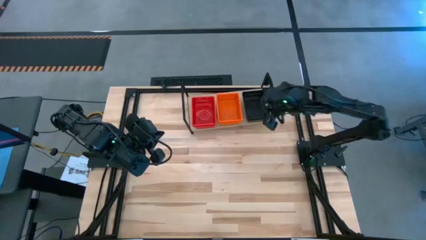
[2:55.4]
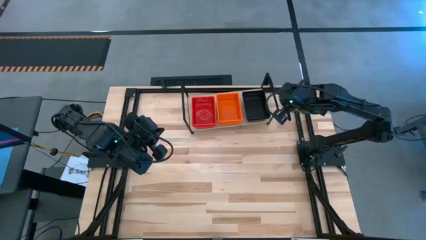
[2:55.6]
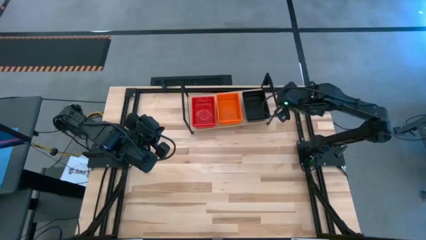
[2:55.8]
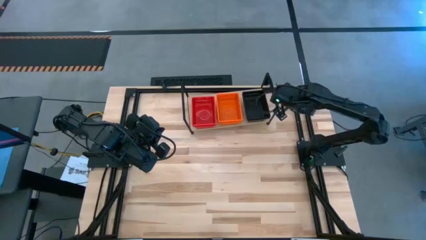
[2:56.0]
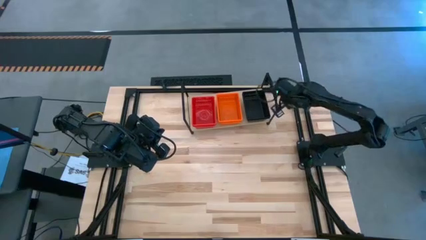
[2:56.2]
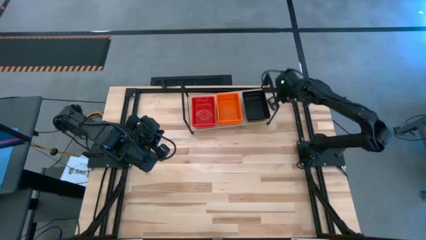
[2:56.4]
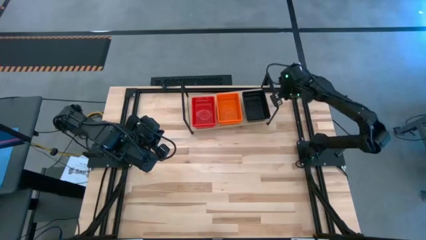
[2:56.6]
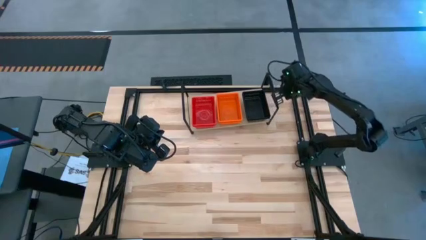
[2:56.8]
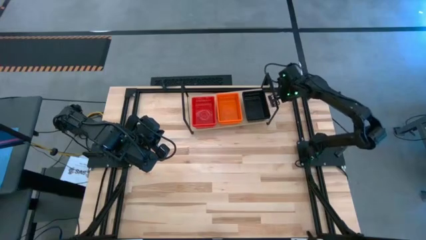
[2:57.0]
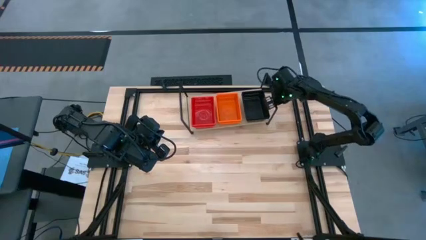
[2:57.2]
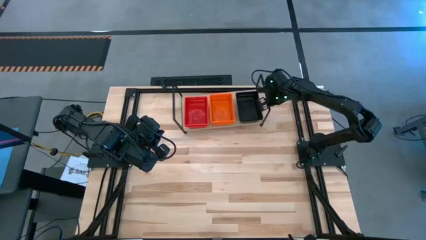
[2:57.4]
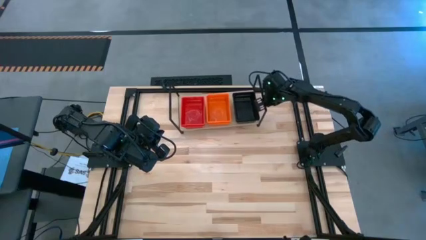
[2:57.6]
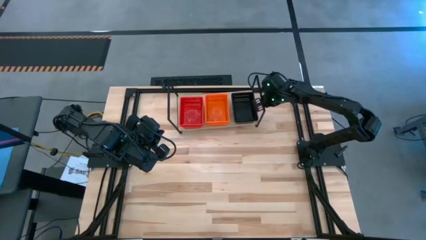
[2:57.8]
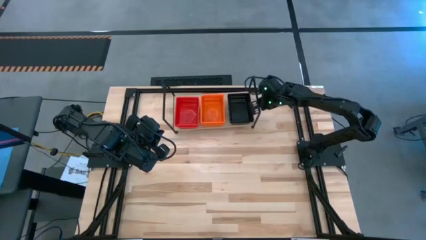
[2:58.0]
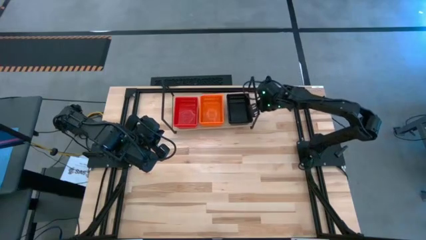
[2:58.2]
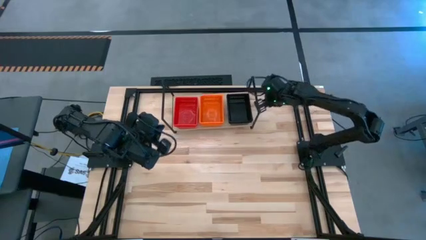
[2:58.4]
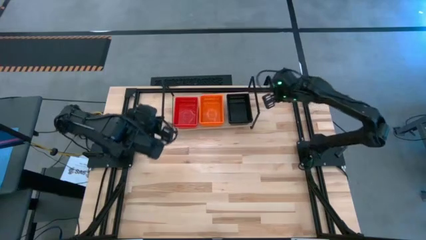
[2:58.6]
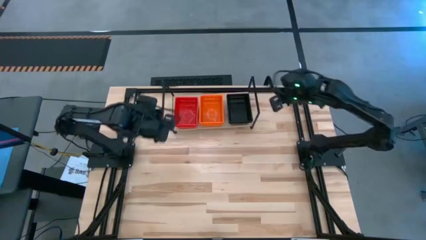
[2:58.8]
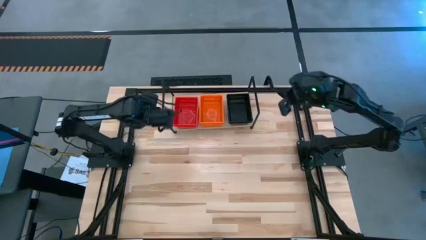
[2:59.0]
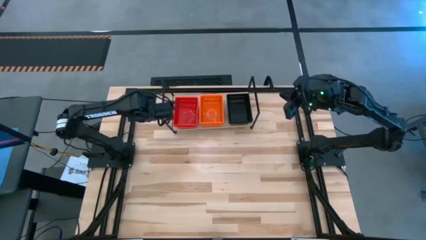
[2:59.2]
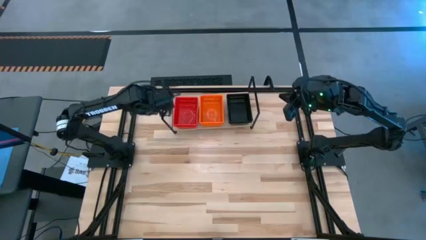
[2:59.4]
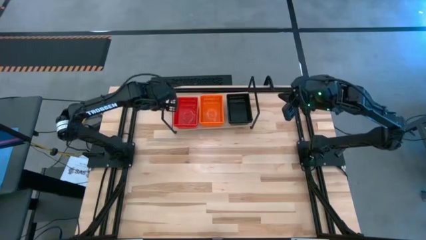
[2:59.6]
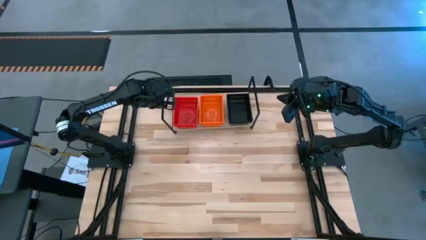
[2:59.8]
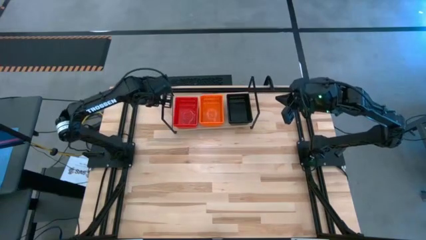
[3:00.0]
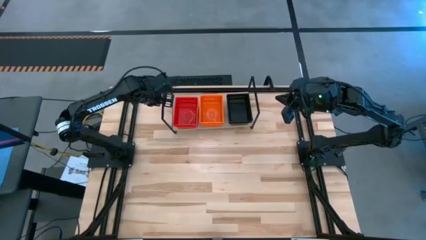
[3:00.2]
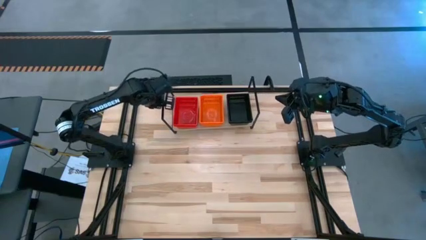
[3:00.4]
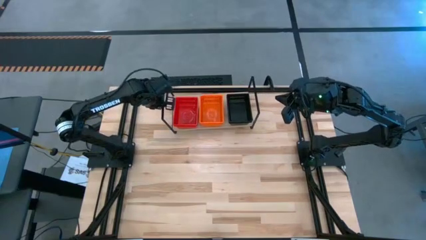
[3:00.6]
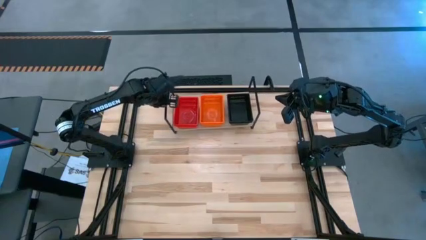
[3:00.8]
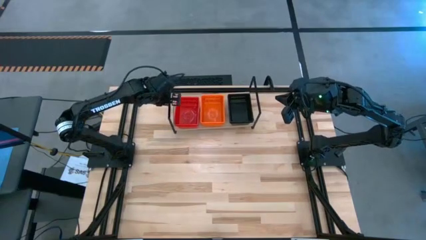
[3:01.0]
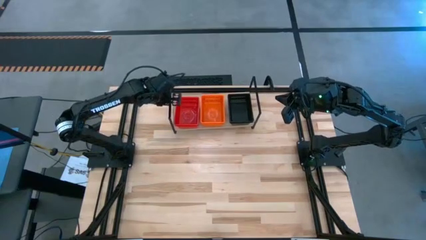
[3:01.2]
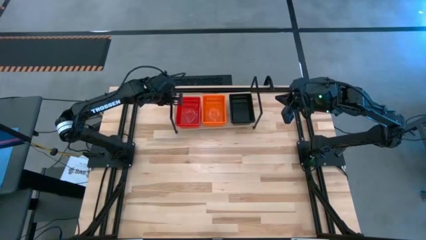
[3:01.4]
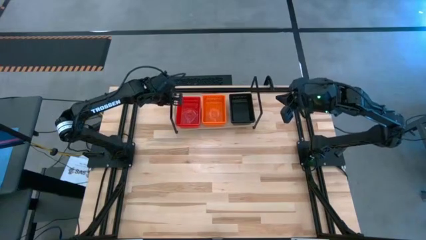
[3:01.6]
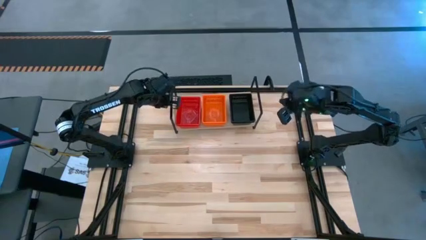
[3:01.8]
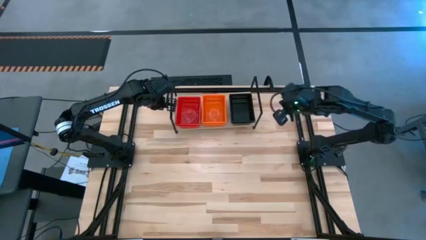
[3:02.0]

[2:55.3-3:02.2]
Task: Stack baskets on shelf by color
Adjust the shelf

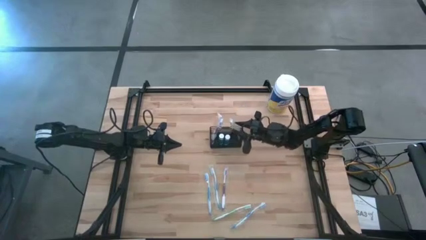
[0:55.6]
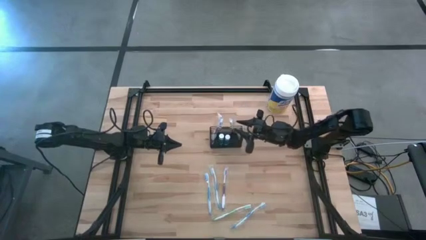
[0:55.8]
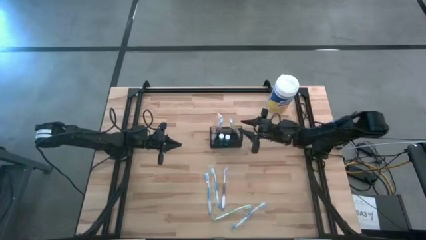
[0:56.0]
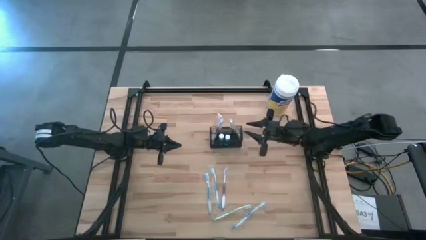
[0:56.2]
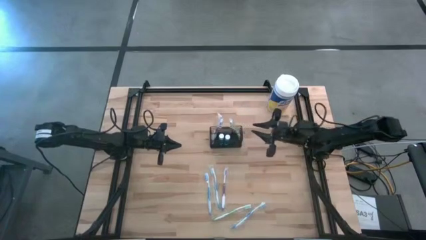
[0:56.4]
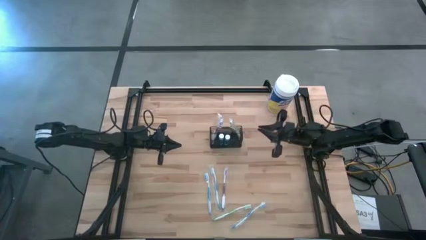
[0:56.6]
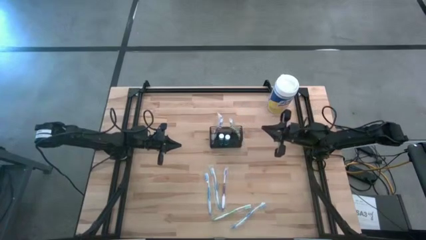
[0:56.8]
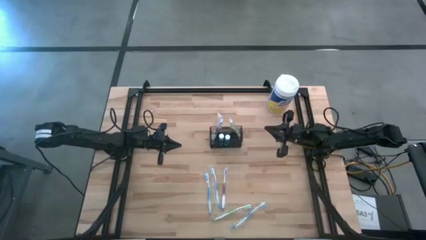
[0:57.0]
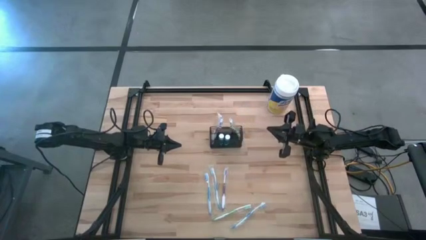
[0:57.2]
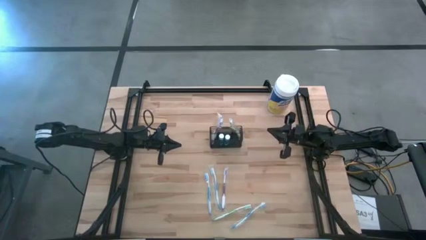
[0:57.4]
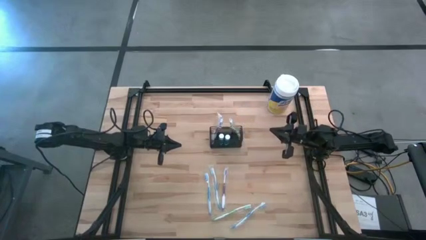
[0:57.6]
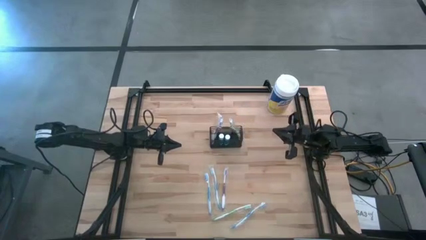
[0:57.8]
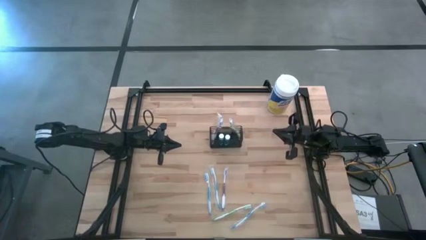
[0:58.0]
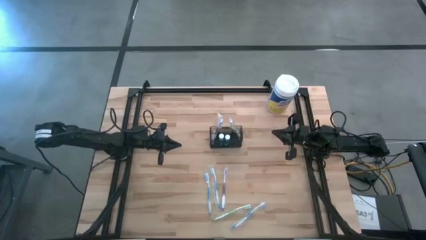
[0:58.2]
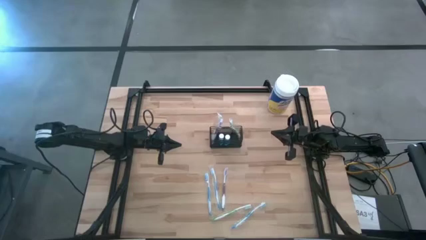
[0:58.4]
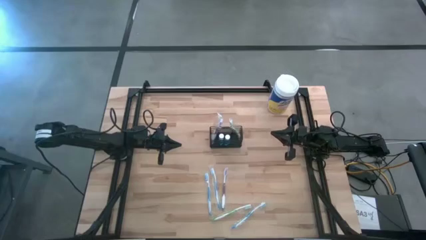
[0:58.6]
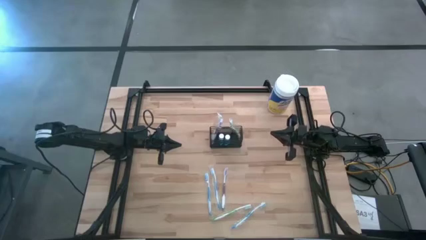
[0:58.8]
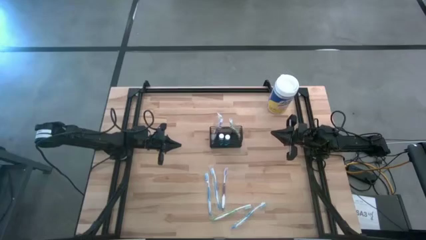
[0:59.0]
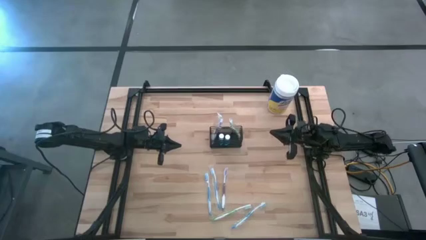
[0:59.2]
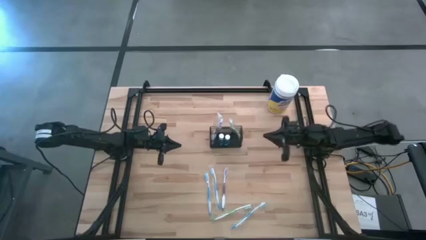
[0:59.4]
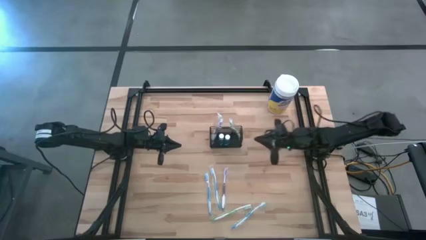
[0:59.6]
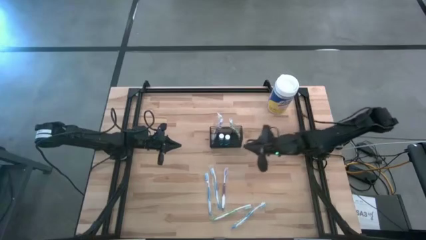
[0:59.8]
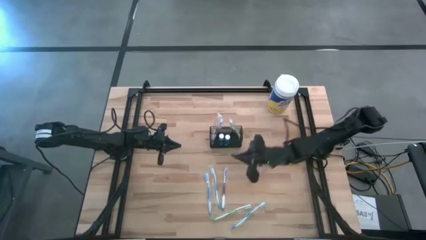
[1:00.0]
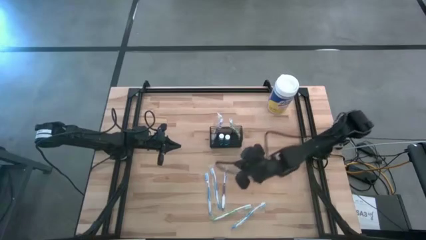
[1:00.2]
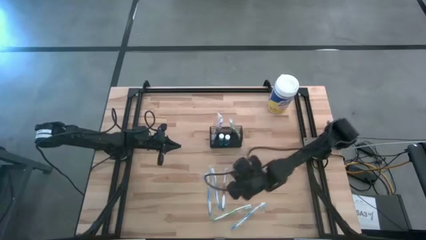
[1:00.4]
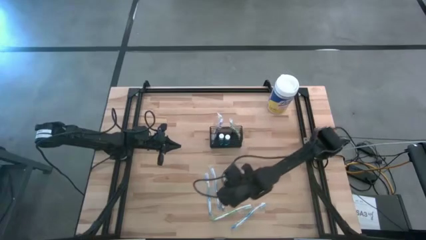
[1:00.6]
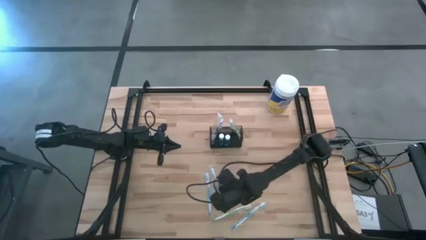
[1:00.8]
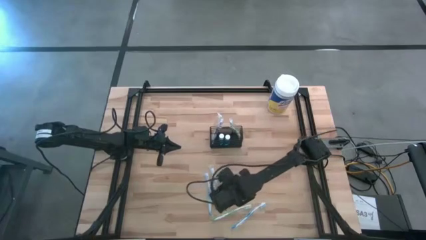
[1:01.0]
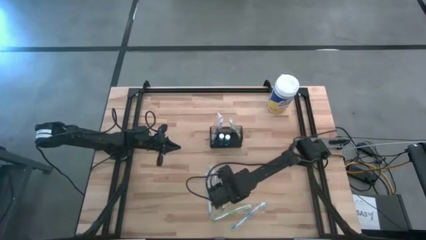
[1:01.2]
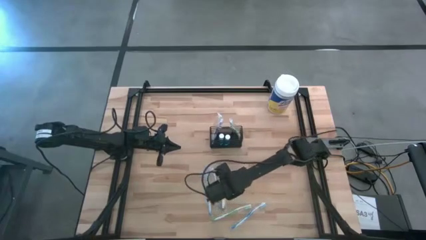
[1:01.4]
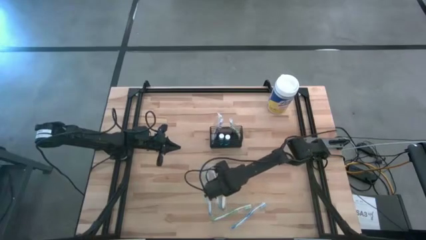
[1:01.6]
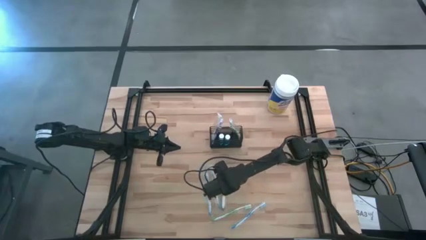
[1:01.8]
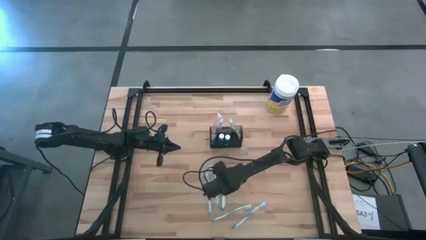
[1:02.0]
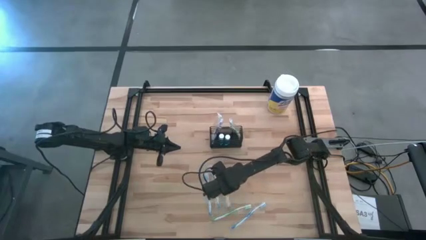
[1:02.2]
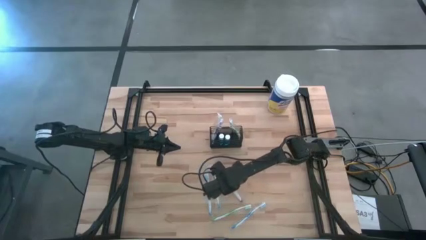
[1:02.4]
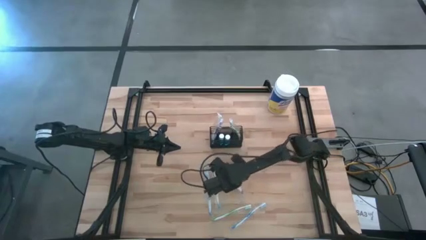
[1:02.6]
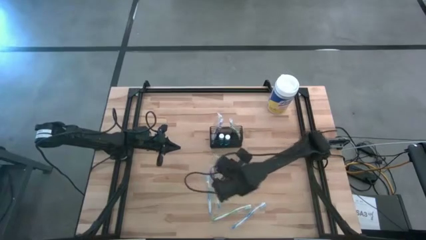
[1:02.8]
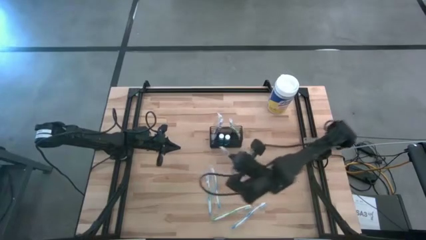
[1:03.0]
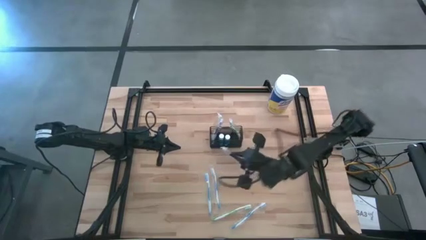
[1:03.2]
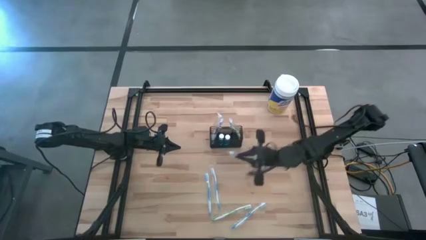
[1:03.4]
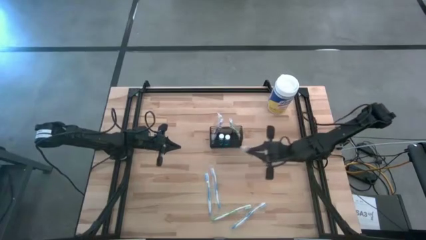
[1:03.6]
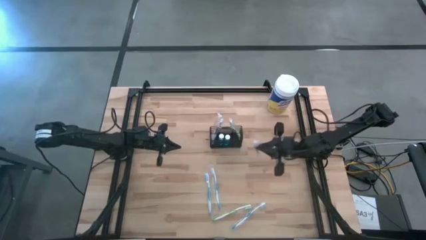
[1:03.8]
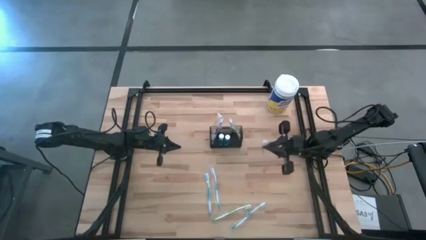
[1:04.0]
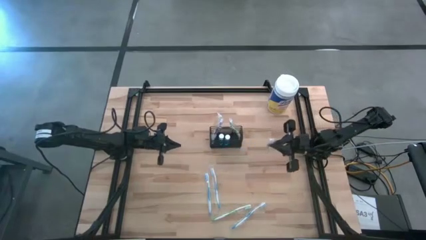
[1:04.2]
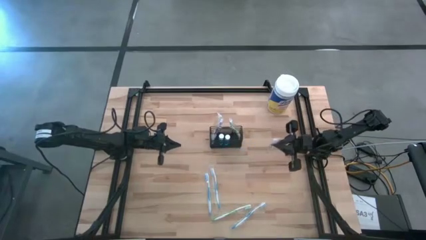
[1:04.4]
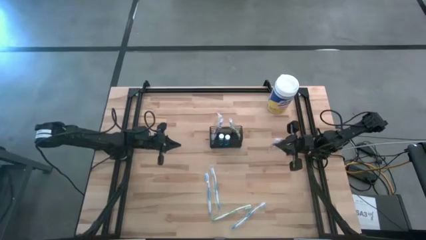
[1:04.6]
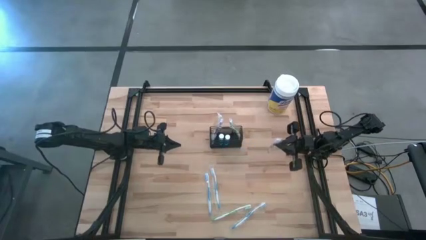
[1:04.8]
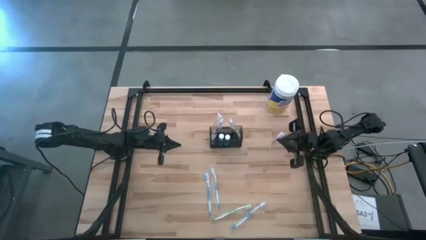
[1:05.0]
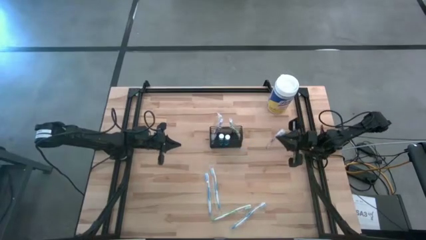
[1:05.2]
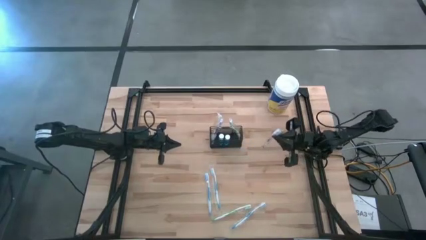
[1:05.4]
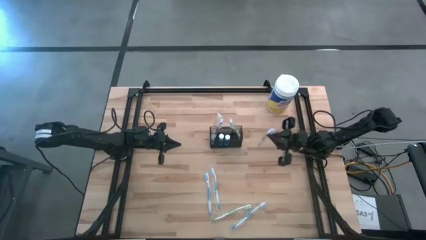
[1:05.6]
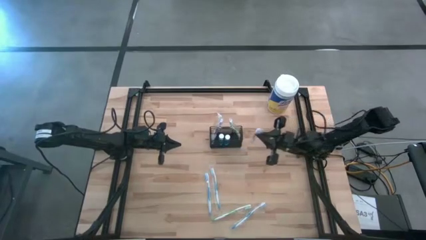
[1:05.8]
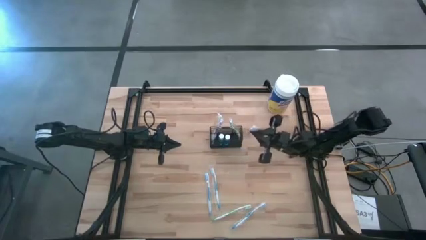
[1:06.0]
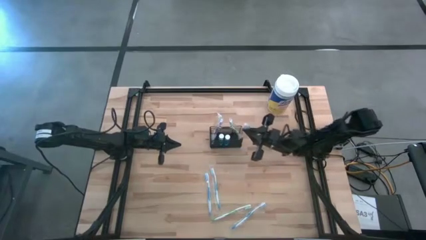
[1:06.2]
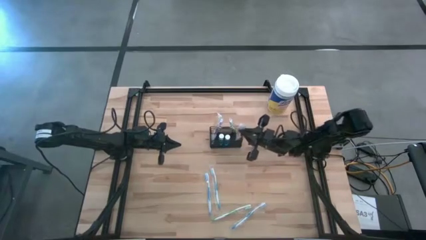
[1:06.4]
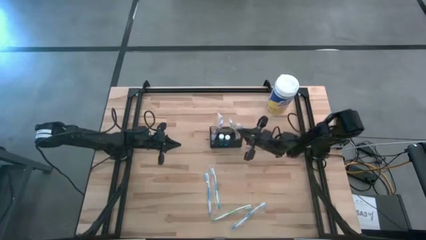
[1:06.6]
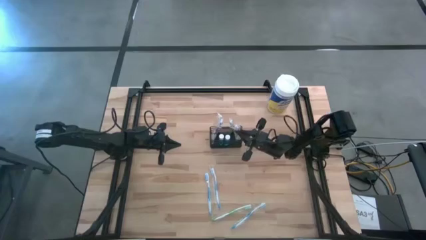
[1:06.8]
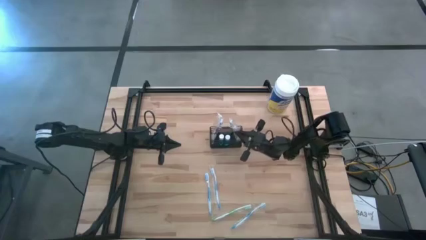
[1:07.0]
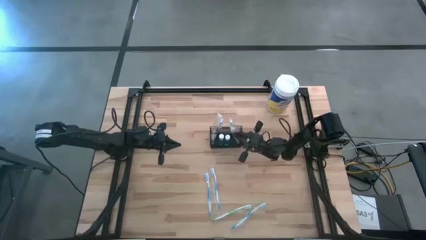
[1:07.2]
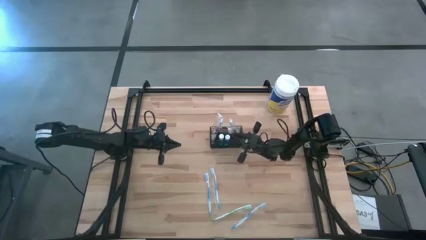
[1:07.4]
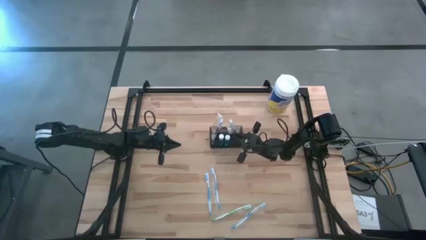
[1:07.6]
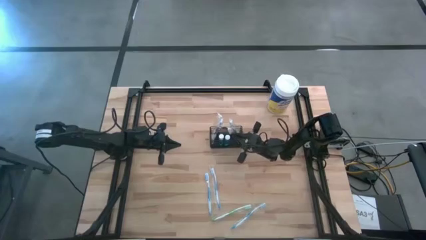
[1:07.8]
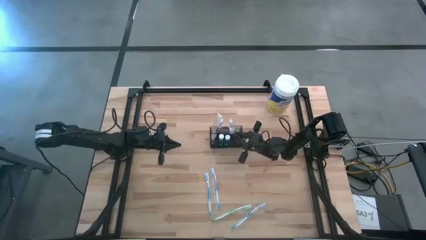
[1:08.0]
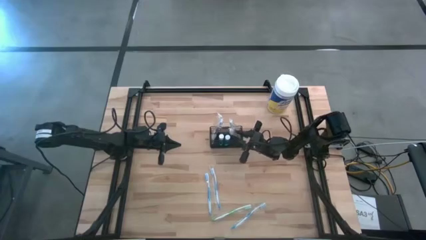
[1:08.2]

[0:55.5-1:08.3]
Task: Pick & Place toothbrushing station
Put the violet toothbrush into the black wire organizer
